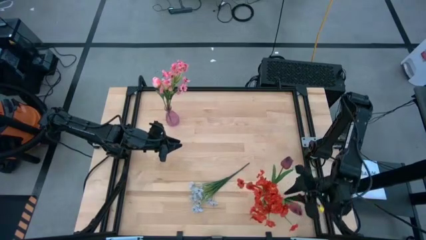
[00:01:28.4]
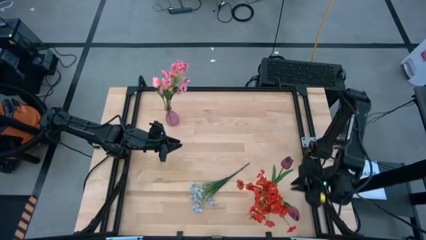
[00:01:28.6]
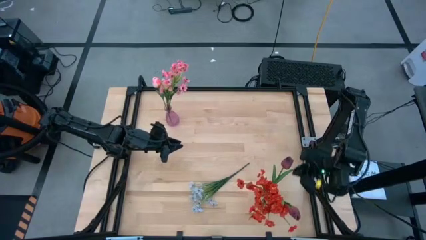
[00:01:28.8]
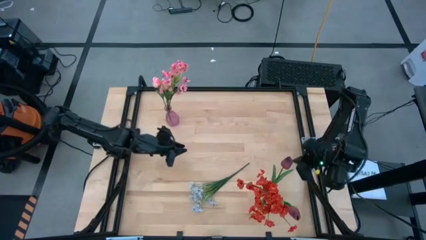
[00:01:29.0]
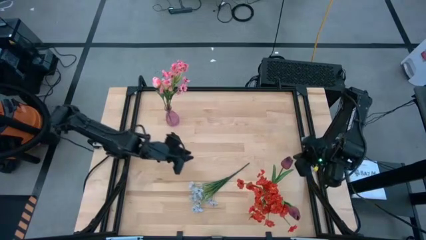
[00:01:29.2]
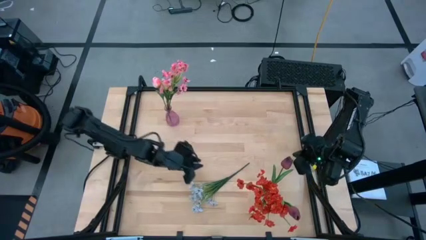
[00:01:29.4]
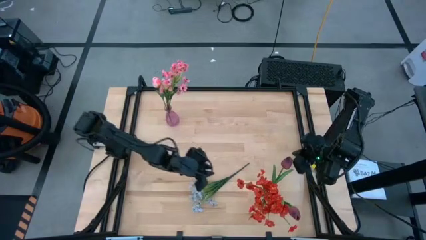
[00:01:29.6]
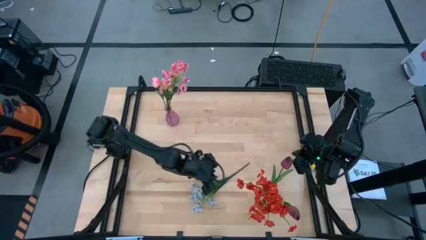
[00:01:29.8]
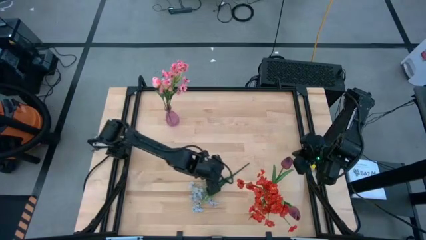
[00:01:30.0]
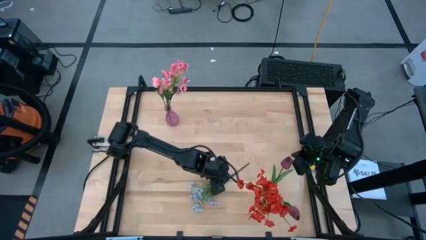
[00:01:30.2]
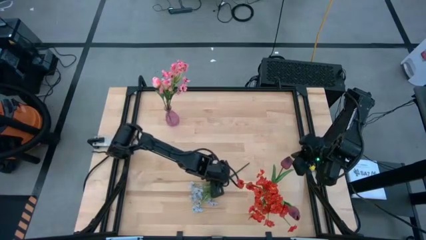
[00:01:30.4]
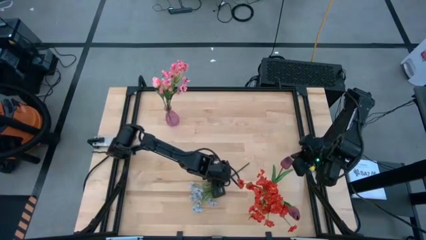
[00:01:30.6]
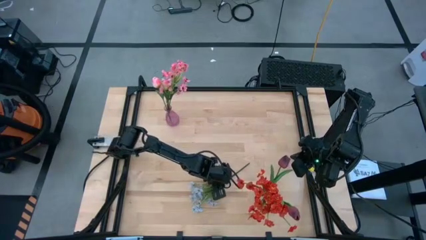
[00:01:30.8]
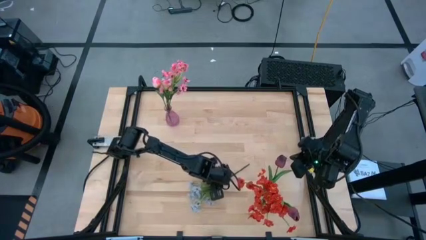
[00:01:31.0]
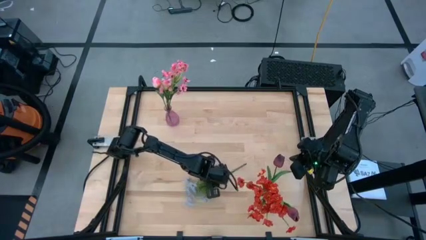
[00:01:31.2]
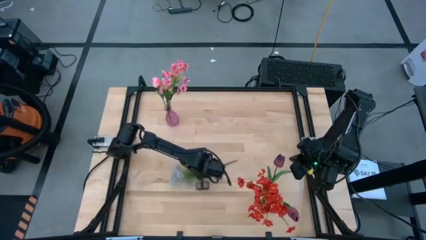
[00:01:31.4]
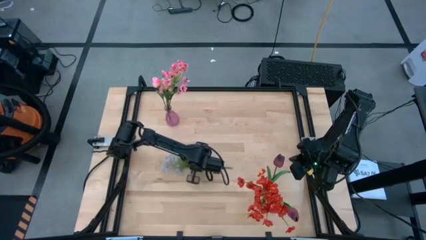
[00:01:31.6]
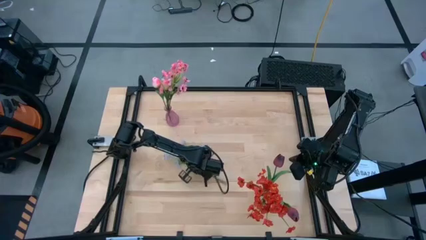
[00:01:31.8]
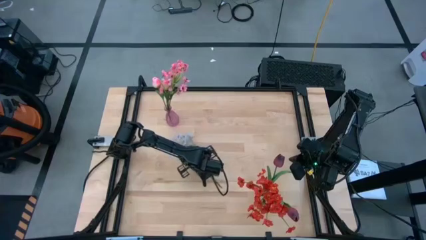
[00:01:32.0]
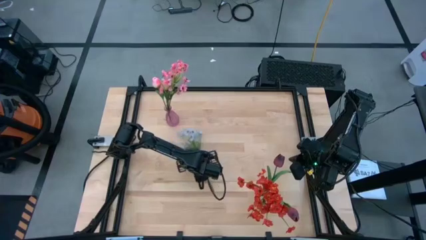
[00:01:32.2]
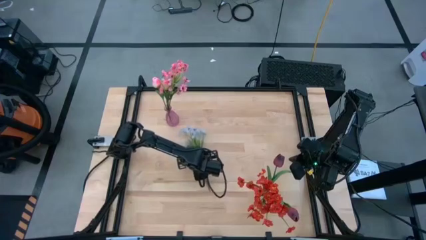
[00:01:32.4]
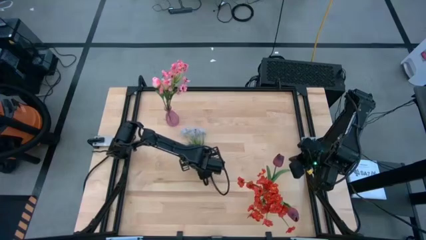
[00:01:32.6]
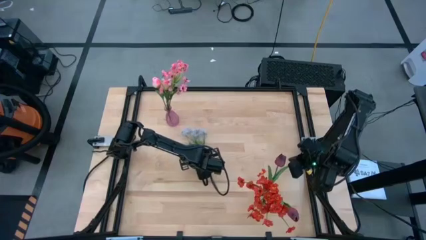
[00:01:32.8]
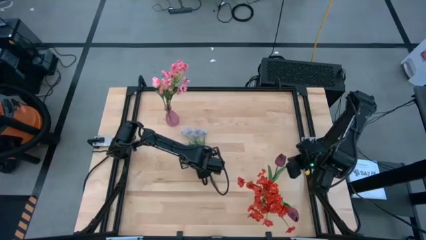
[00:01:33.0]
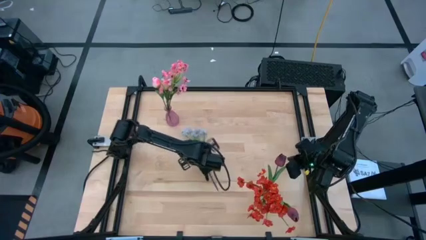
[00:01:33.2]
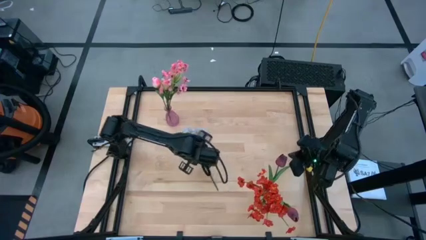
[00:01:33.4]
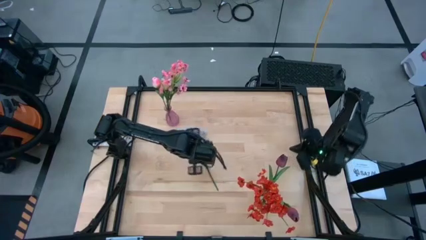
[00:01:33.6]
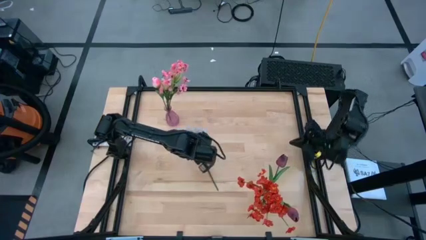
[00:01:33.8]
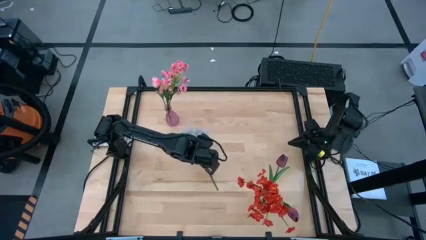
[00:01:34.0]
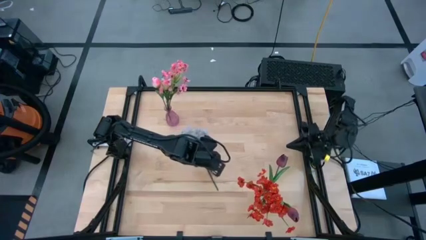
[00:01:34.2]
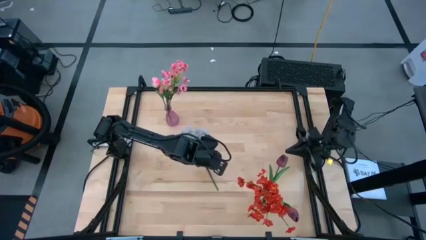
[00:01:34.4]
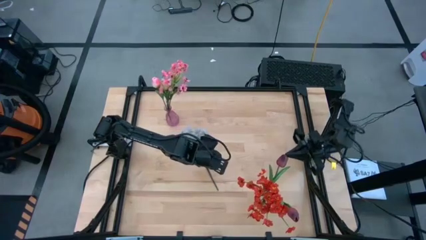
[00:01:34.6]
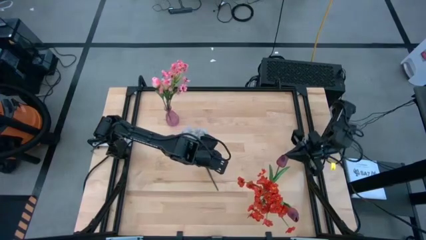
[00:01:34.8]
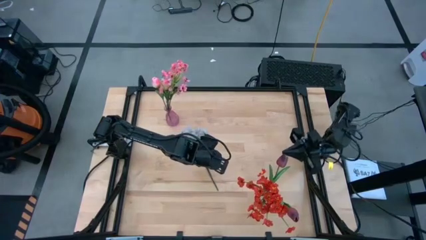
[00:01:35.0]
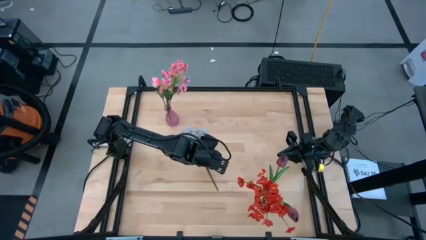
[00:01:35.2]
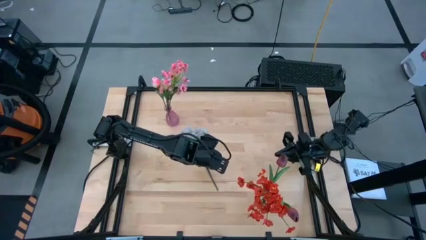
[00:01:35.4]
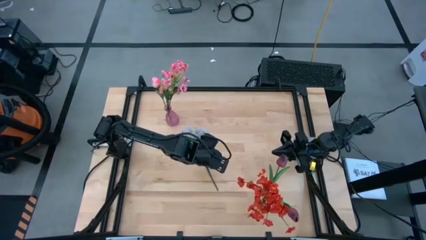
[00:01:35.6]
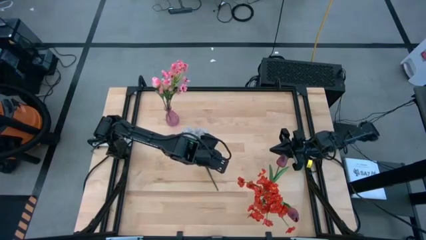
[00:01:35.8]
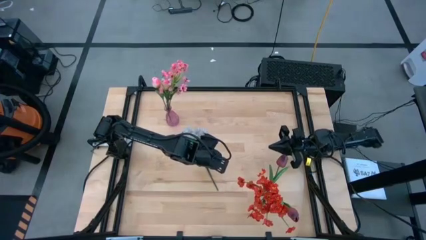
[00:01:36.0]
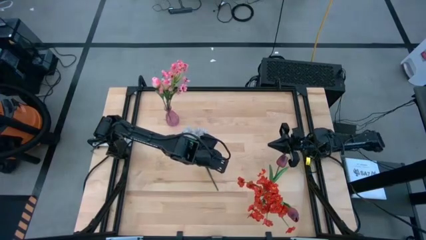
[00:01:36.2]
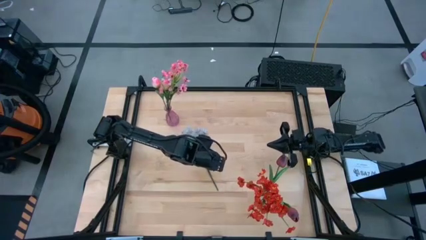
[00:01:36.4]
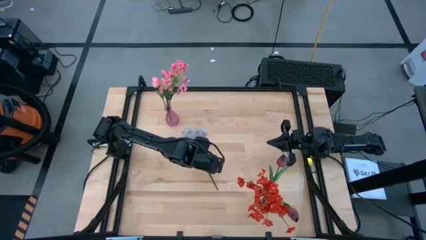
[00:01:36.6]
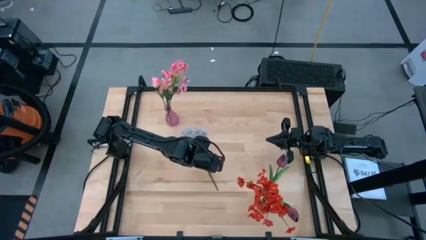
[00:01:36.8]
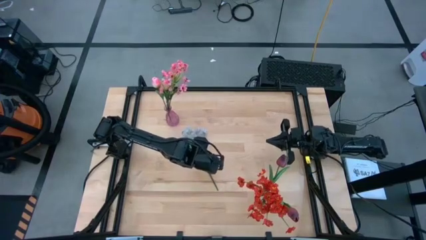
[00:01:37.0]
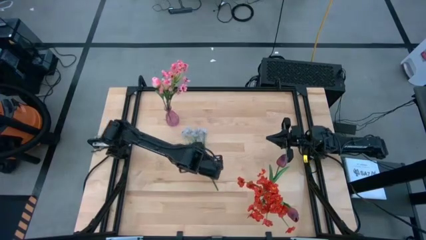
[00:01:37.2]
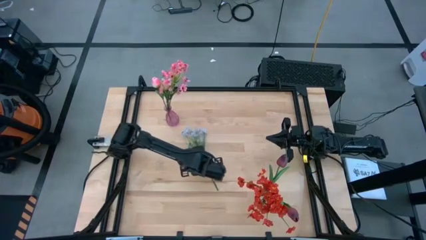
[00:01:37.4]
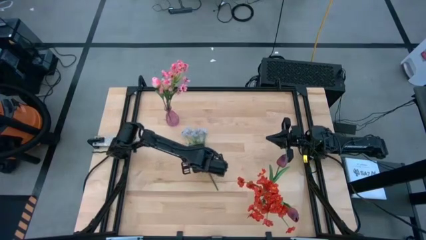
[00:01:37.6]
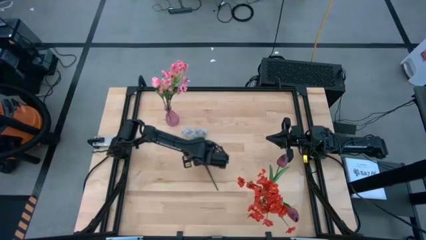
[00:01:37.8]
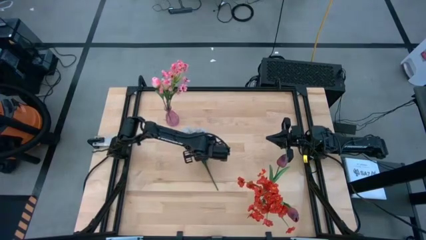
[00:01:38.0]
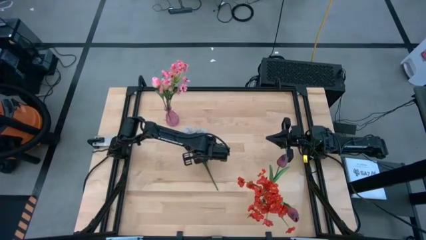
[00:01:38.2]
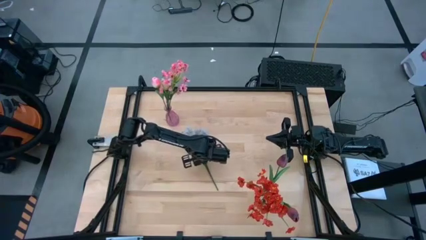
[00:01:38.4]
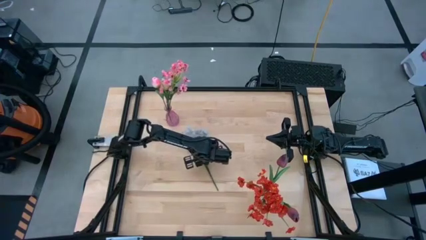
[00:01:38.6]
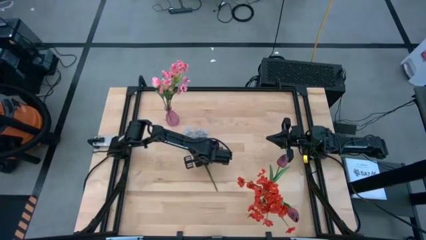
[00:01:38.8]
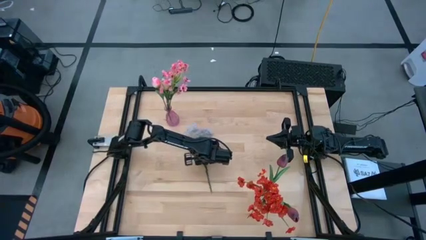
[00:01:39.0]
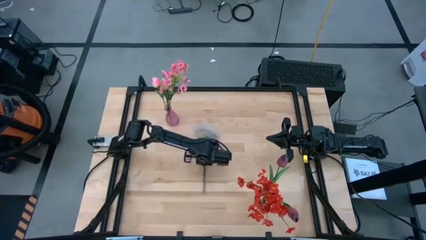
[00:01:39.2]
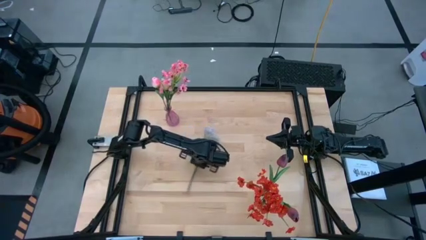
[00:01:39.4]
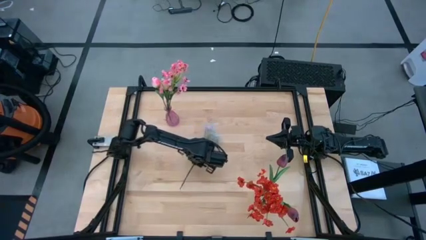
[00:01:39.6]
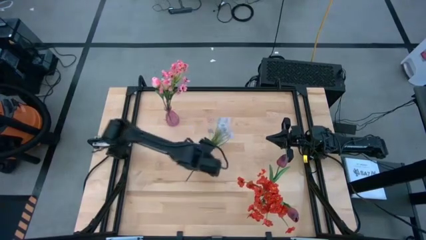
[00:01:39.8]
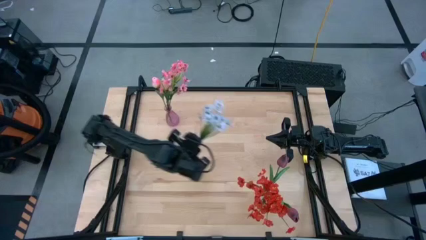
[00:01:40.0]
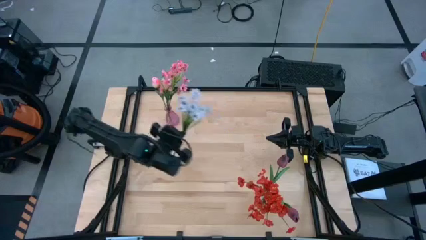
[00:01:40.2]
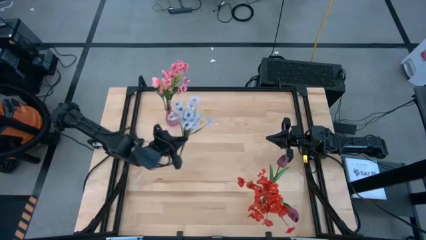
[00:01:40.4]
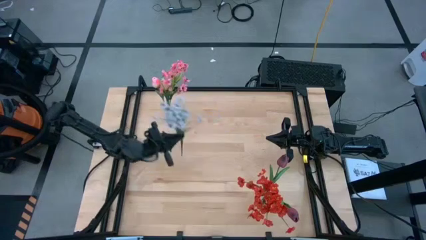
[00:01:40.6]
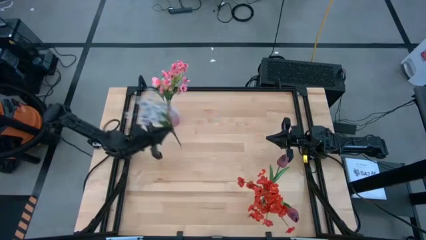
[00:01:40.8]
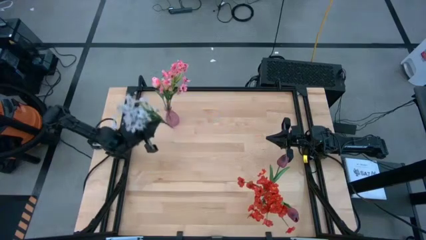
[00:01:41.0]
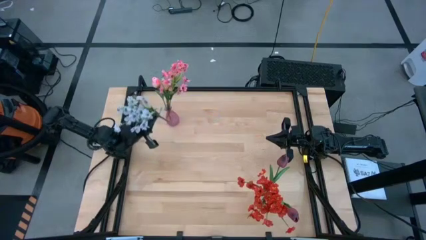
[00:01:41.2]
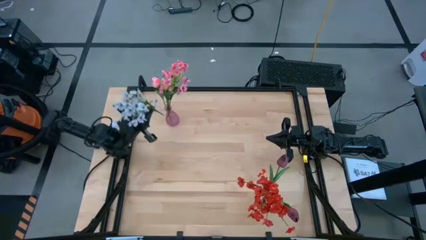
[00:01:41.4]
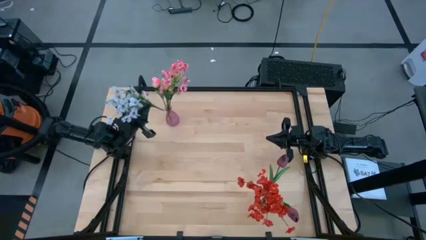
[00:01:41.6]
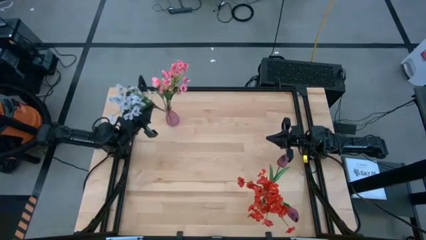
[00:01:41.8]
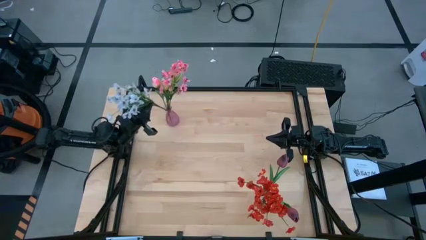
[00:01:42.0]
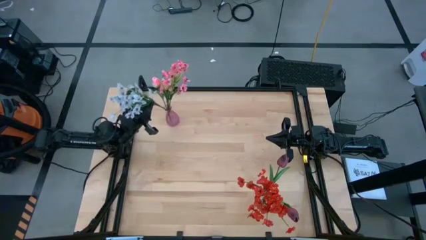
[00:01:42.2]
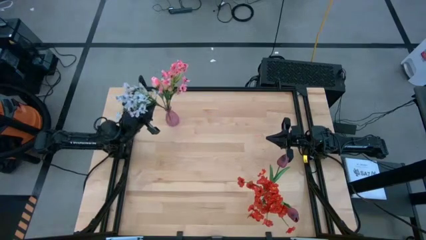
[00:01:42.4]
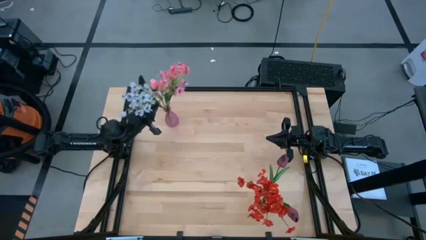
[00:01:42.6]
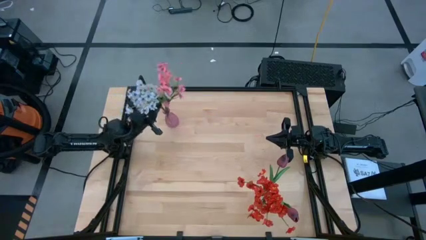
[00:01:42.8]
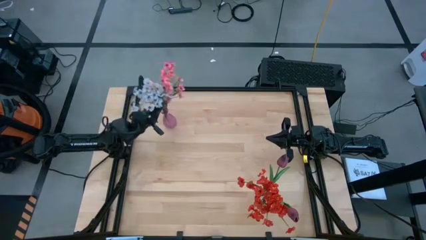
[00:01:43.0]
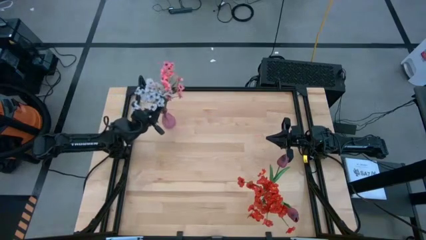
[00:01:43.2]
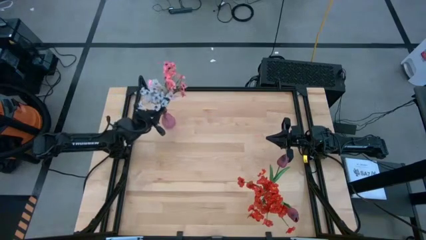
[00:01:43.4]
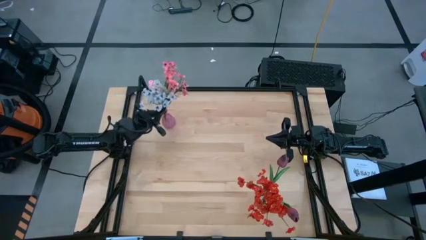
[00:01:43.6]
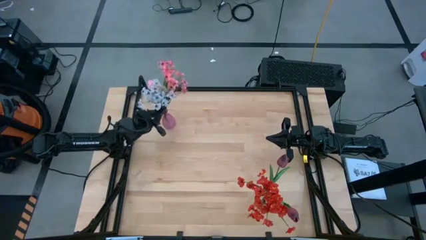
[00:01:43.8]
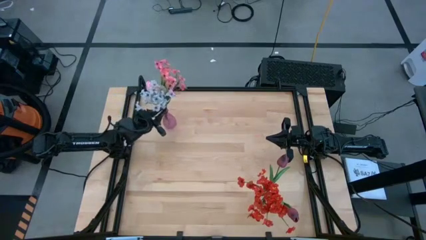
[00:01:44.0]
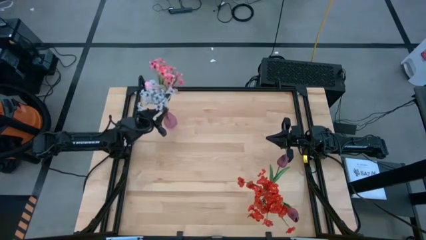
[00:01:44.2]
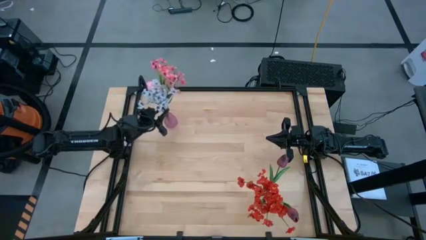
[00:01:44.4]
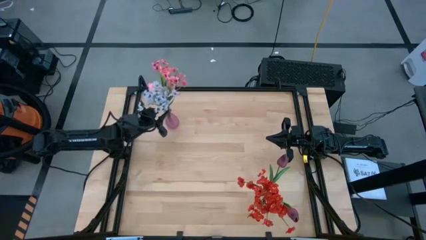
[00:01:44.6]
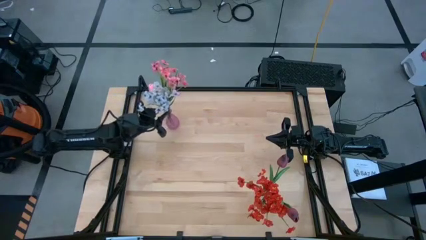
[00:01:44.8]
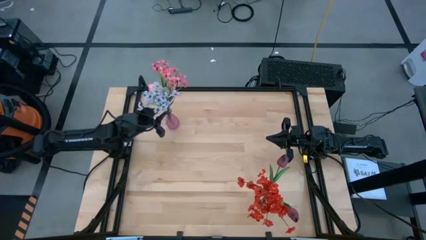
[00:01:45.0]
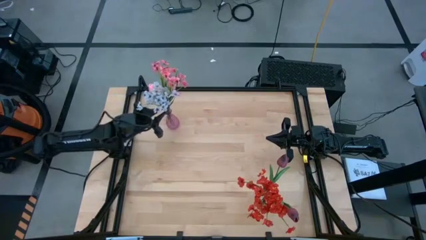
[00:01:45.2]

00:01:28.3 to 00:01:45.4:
Task: Sort flowers into vase by color
Put the white flowers into the pink vase
